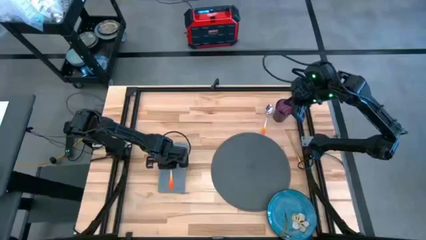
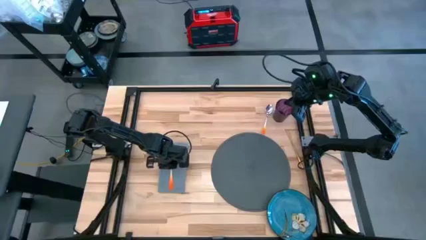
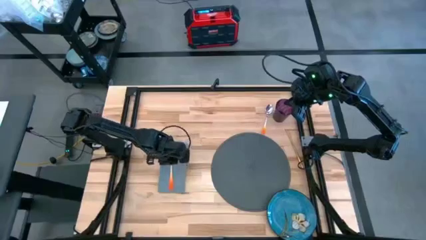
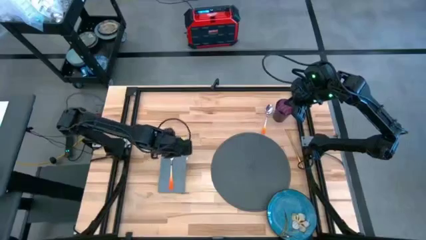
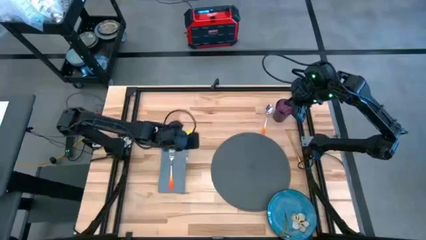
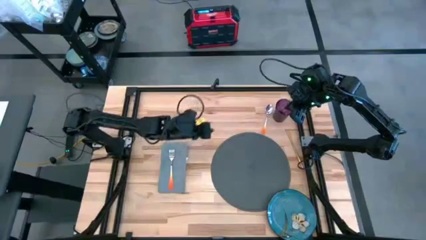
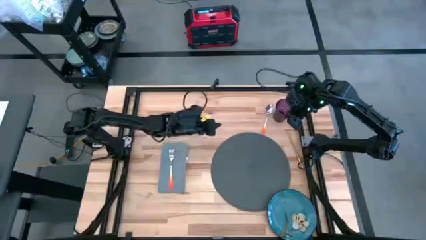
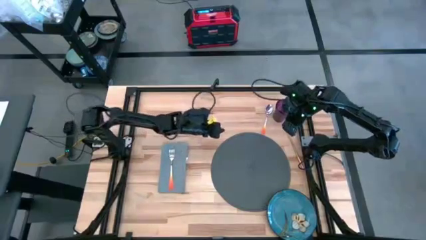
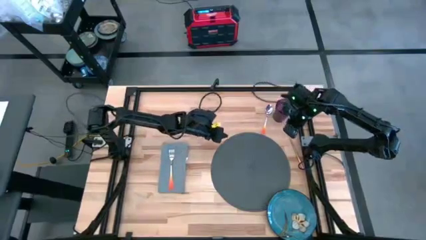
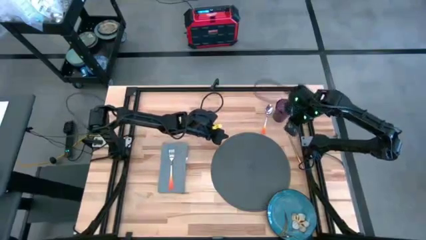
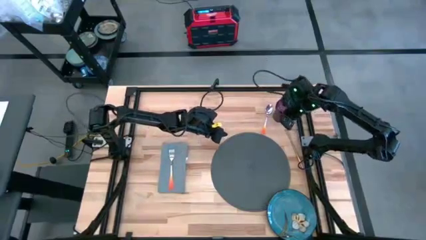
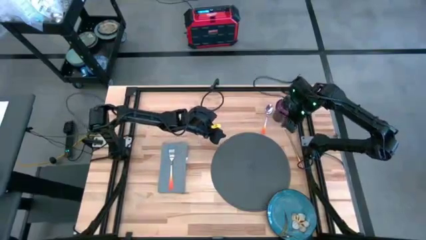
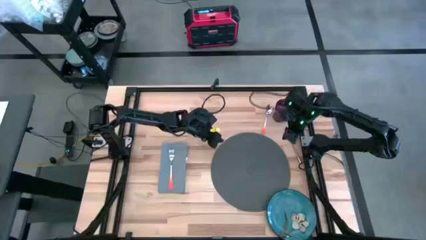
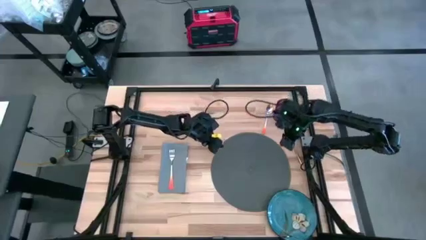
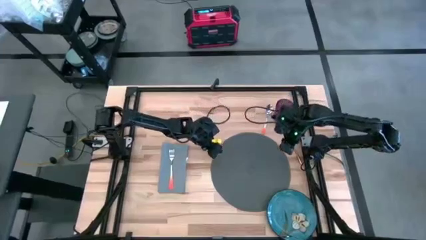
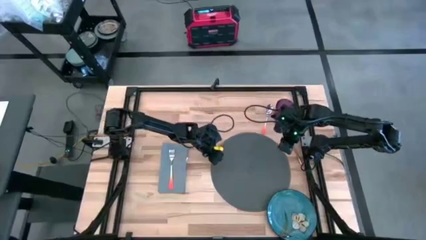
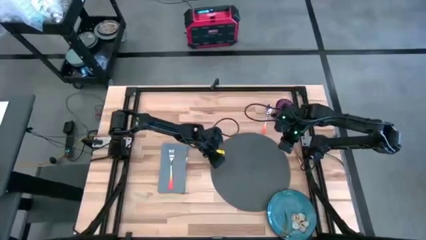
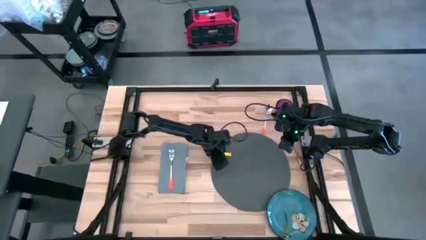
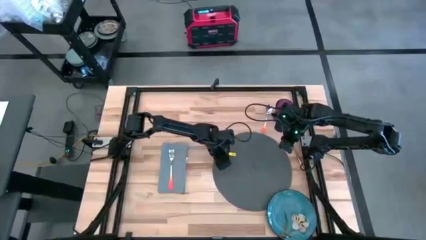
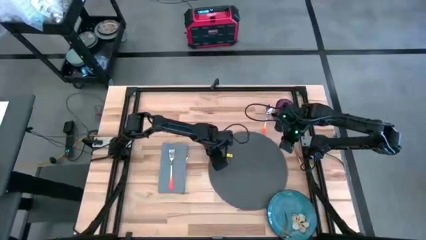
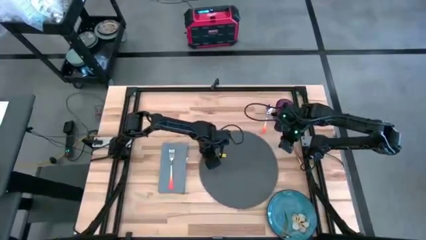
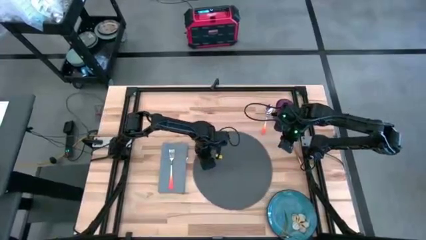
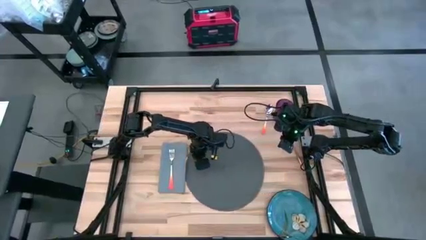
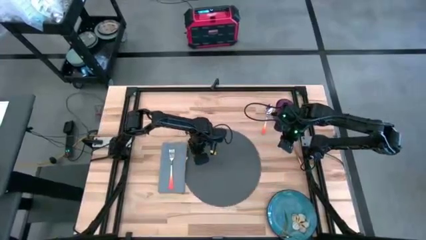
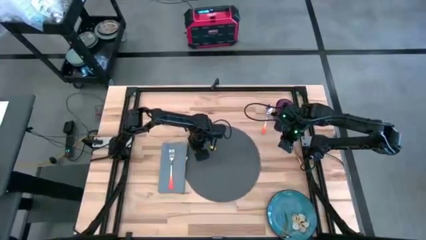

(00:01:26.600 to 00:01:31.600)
Task: Set table place
Move the gray placemat to the center of the table

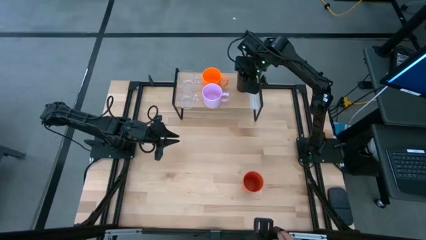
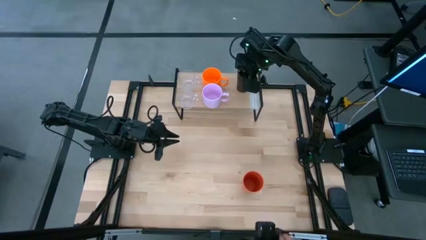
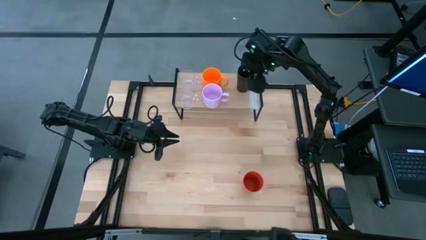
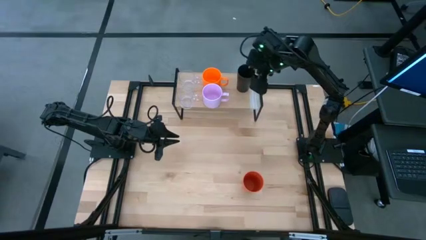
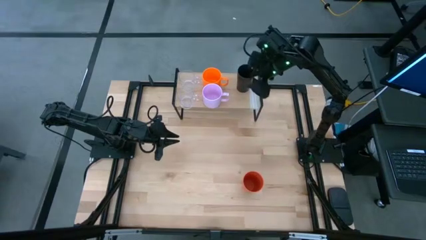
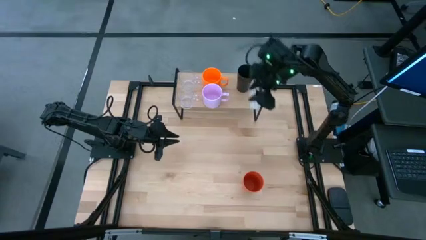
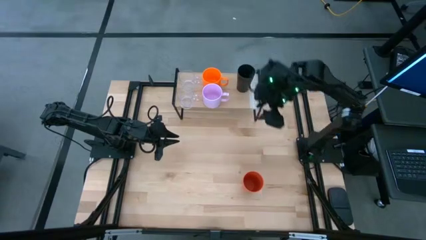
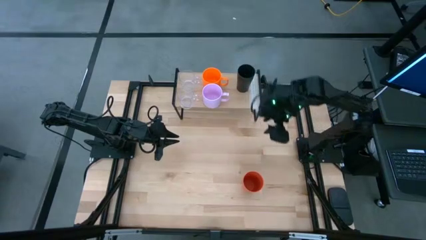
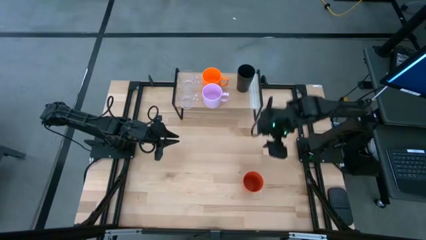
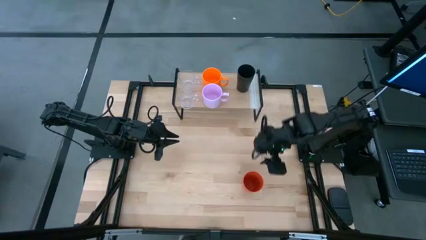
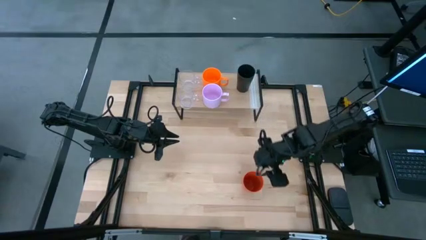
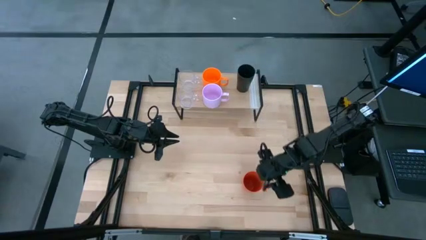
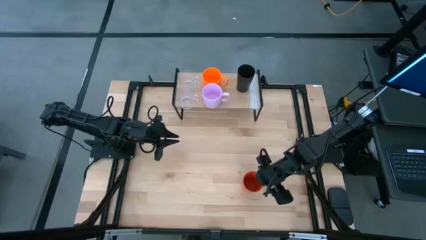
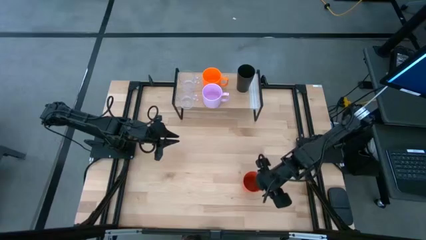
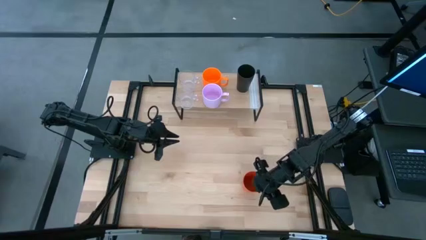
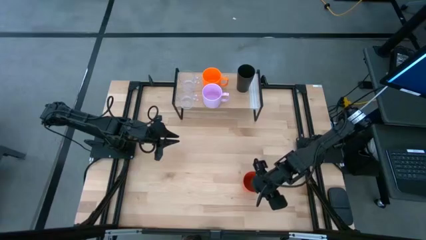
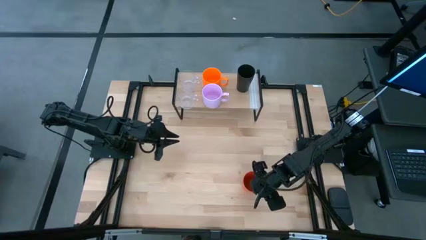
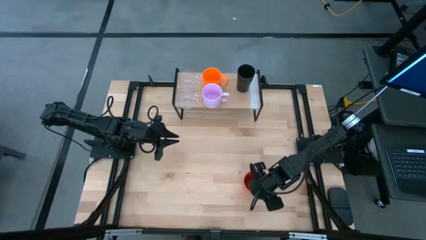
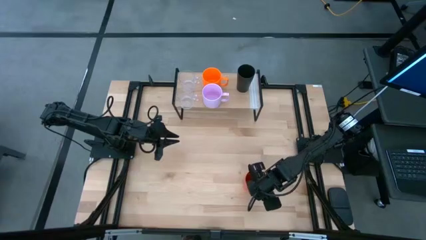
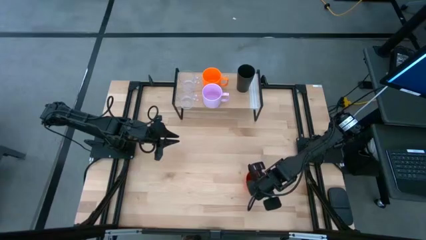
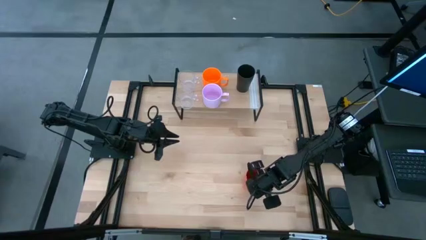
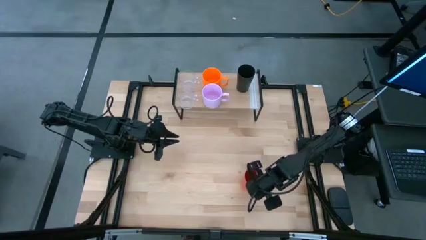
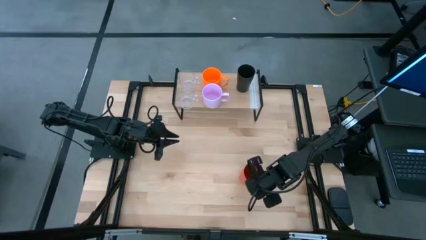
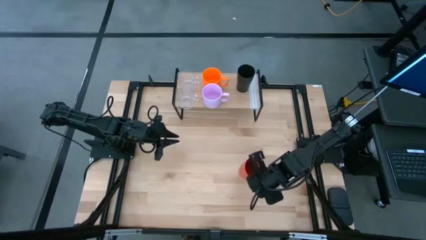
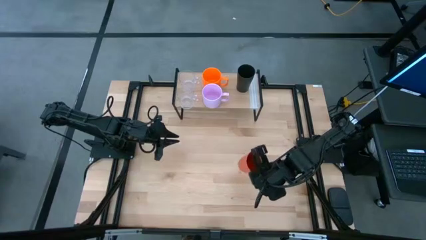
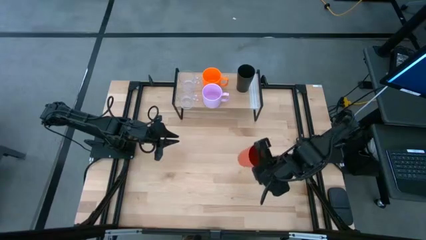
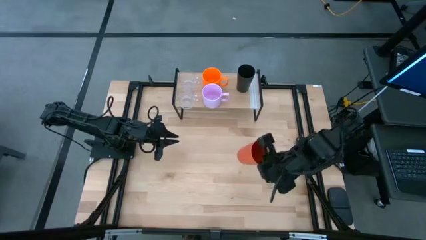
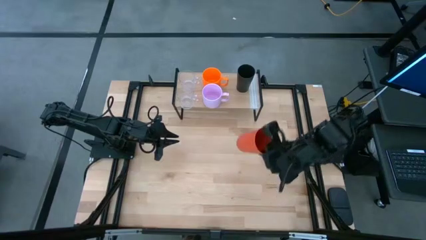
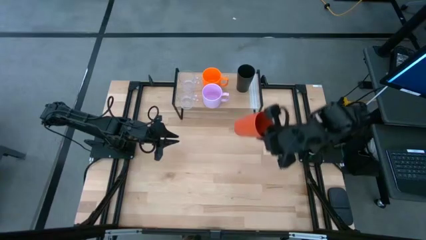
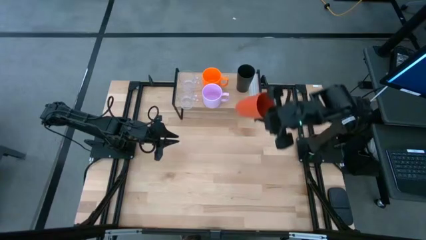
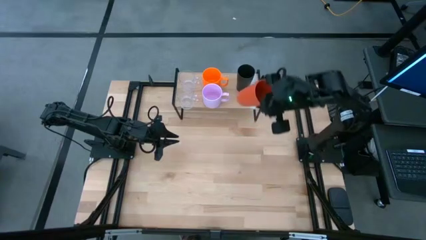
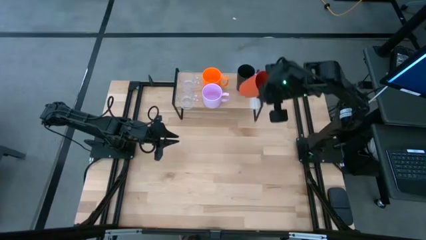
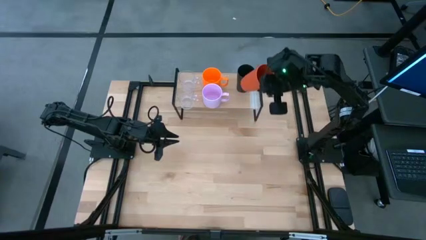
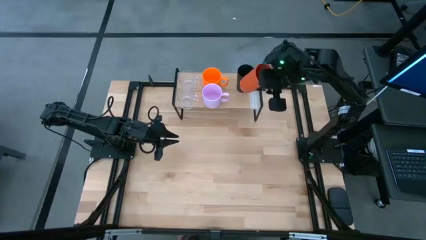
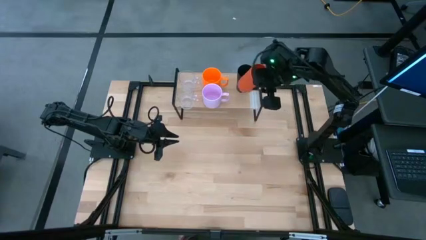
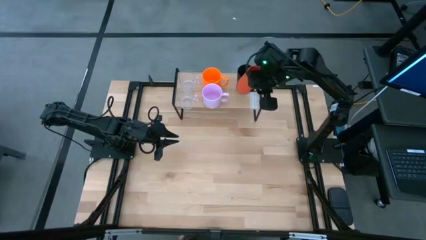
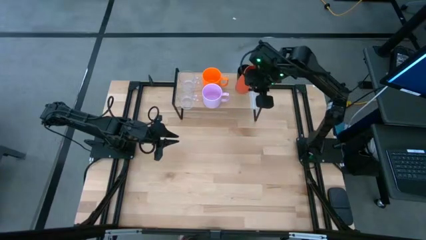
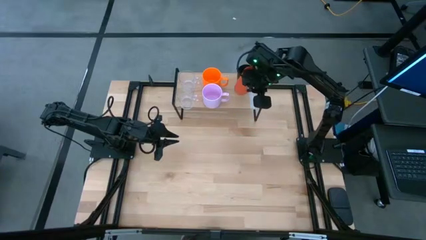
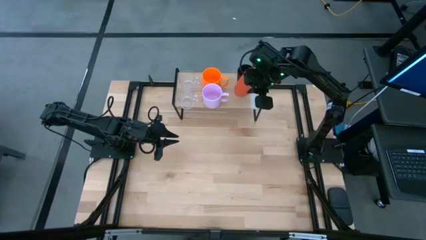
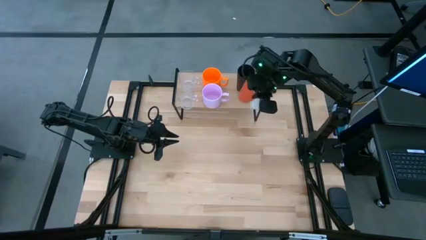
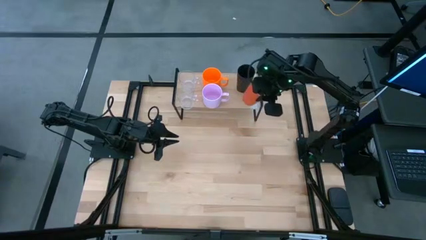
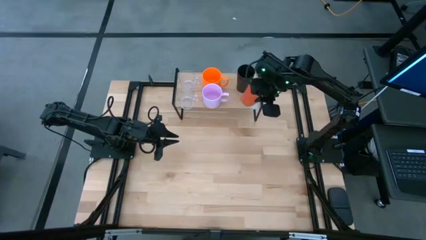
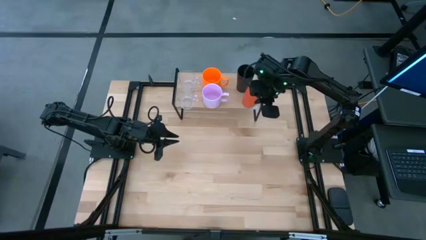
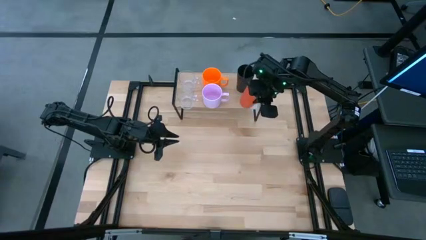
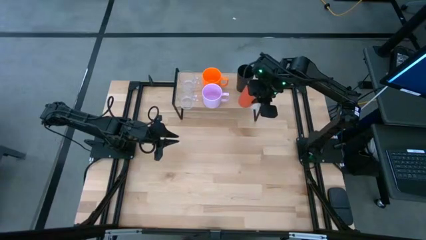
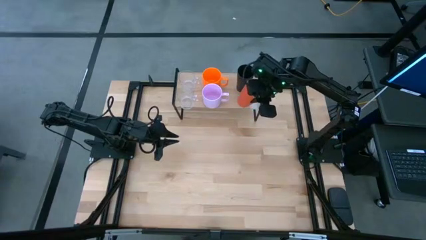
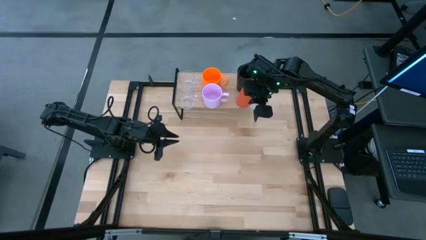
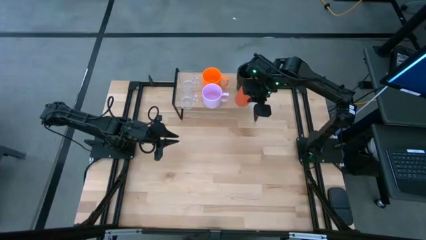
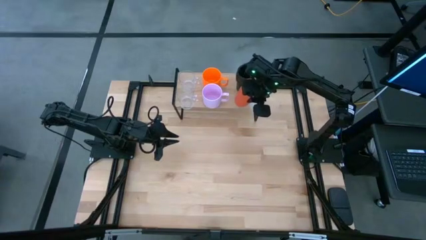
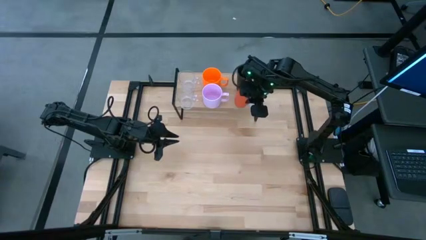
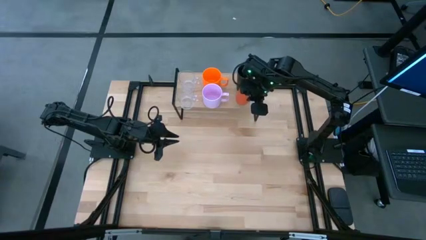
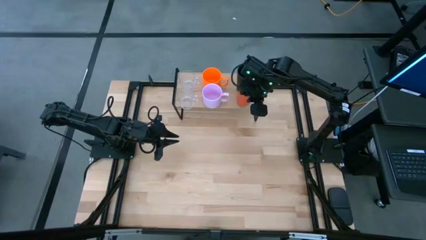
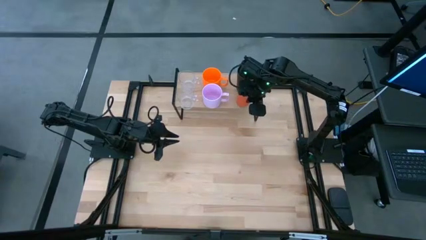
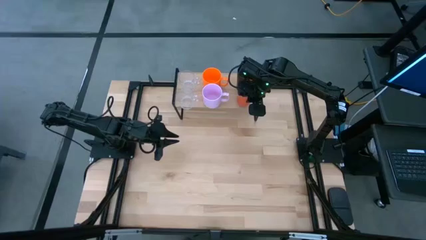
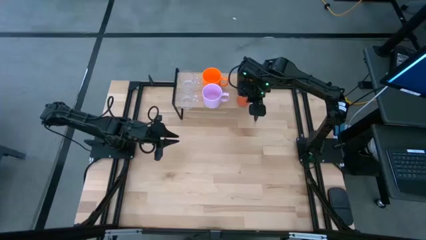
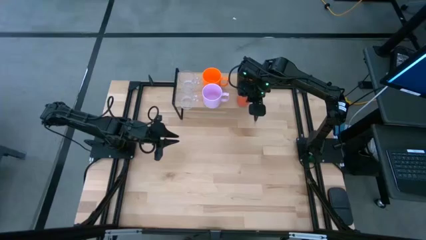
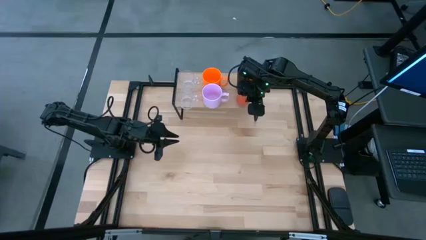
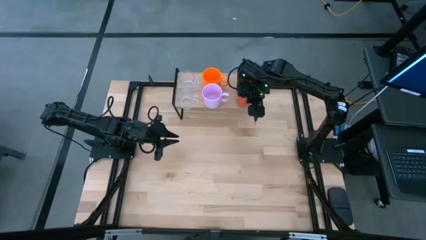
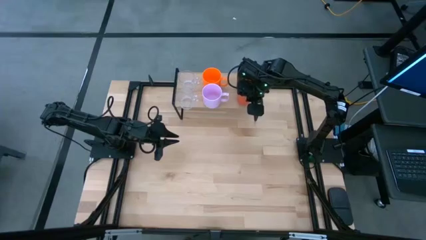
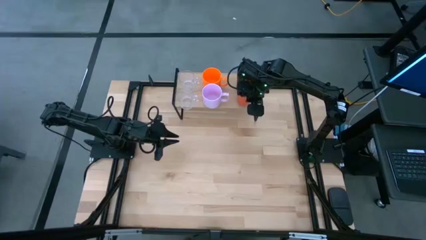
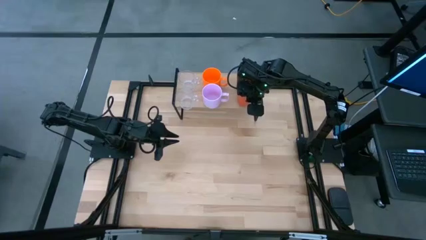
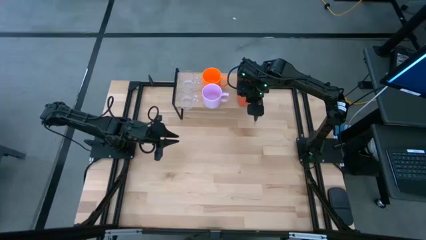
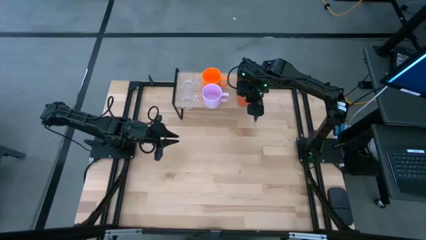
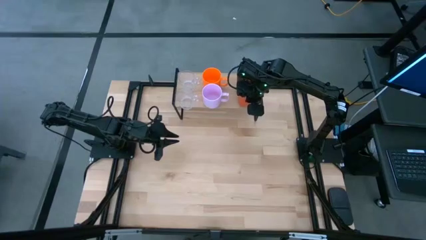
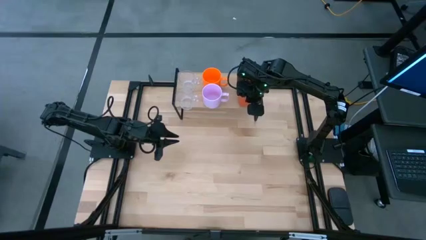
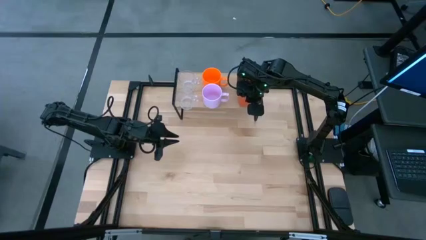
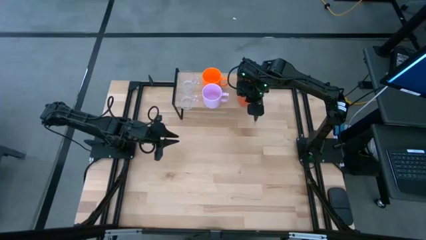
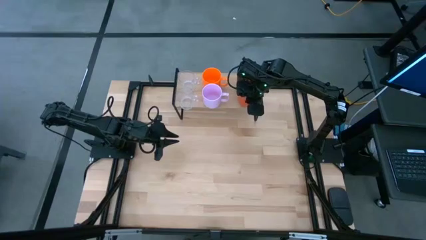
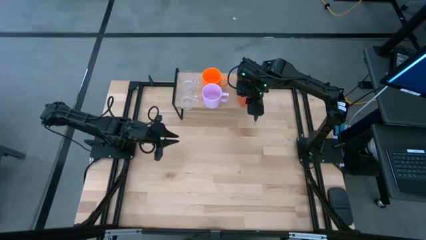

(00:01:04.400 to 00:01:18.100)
Task: Stack small to large cups/mugs on shelf
Put the orange mug on top of the shelf
